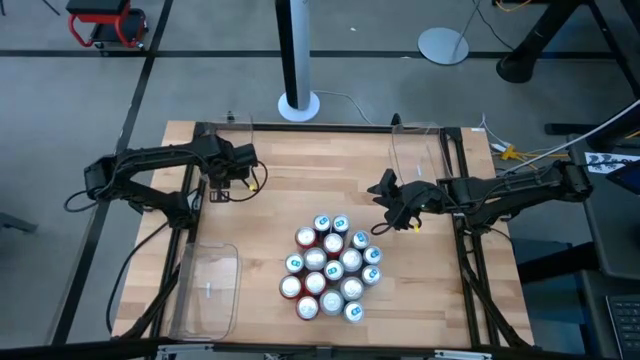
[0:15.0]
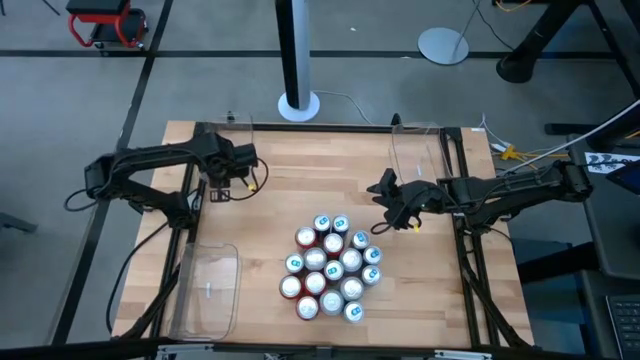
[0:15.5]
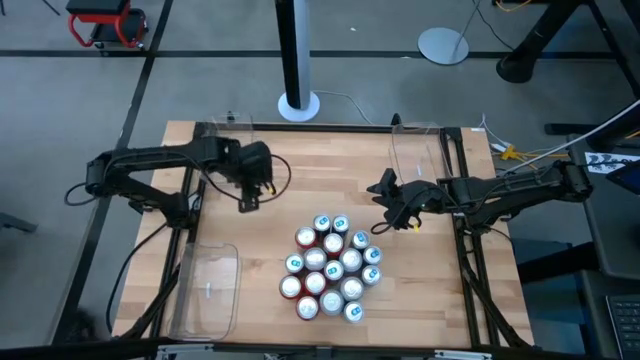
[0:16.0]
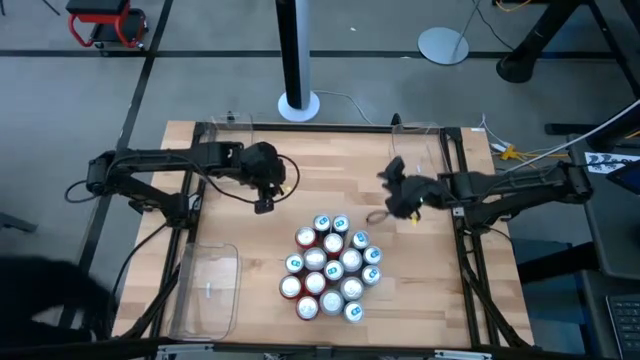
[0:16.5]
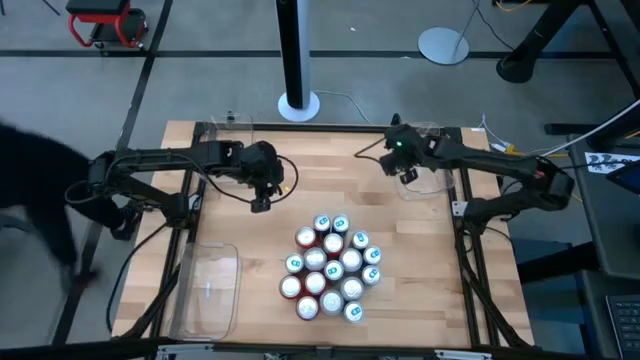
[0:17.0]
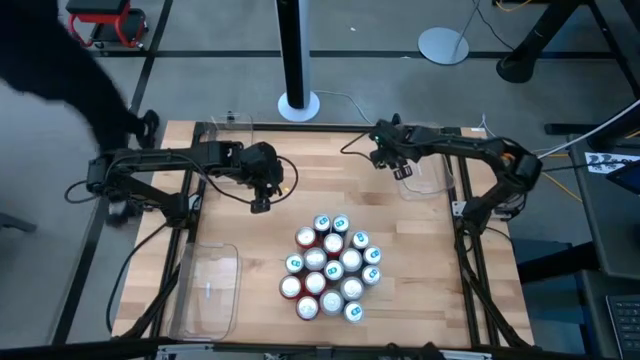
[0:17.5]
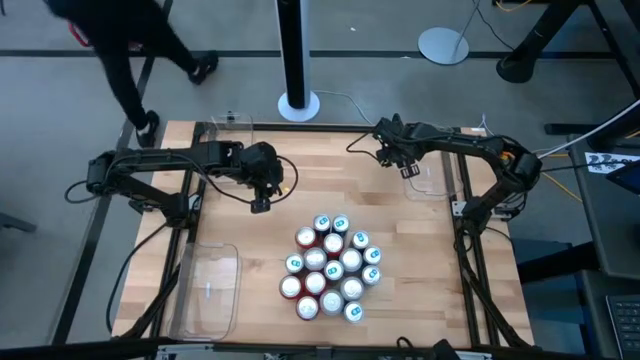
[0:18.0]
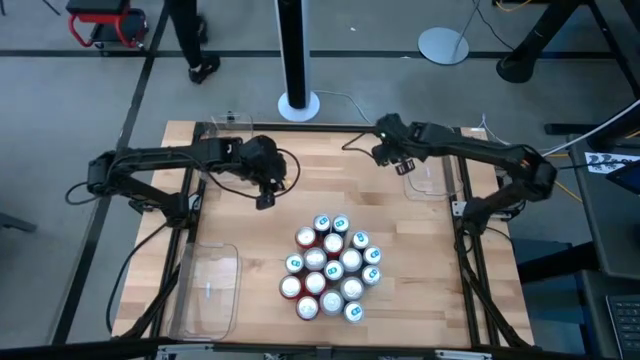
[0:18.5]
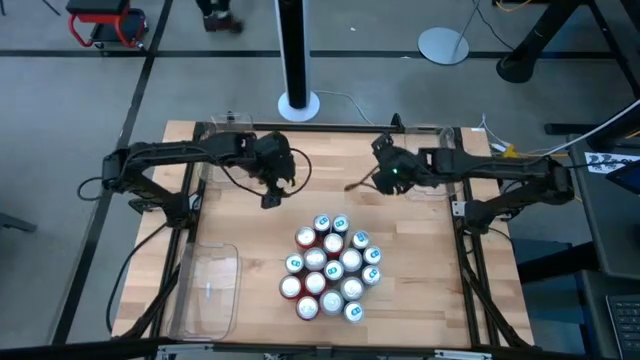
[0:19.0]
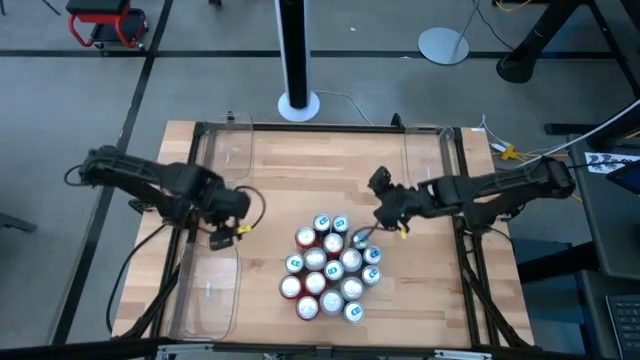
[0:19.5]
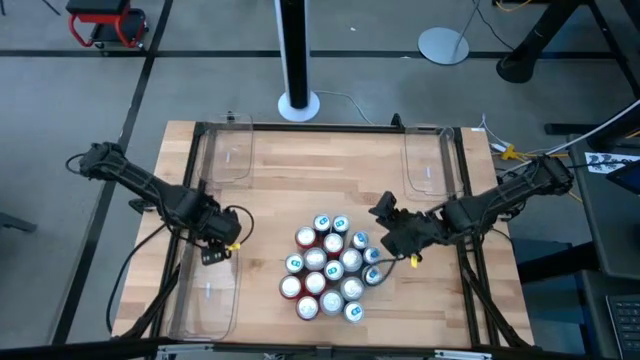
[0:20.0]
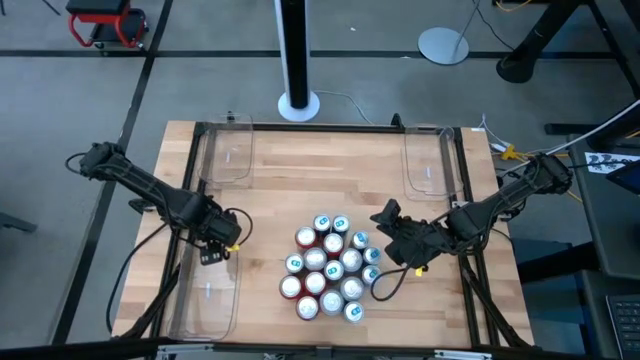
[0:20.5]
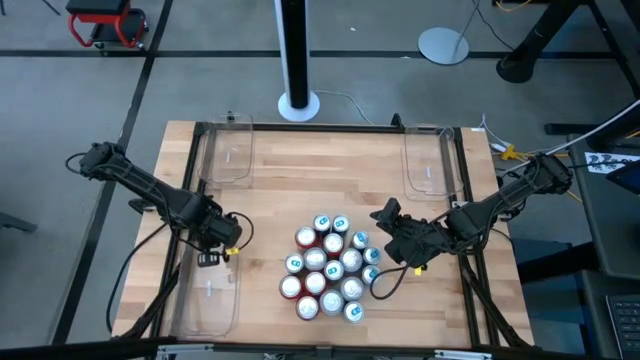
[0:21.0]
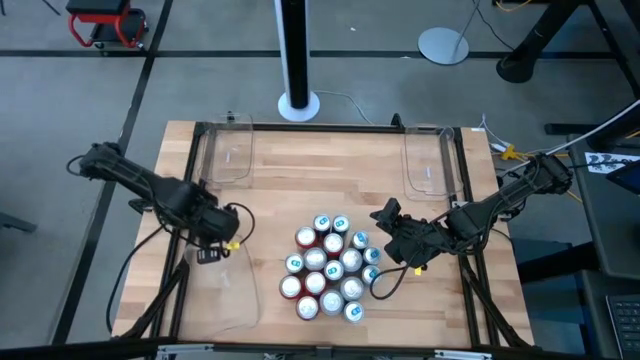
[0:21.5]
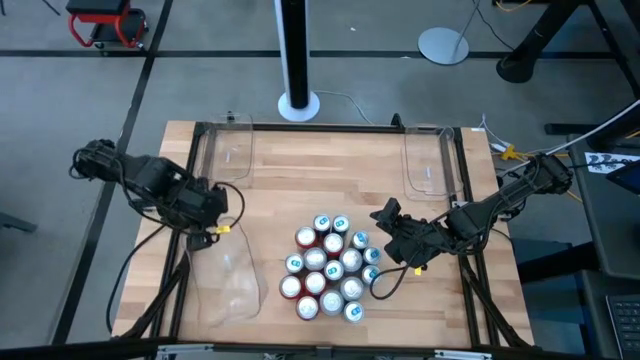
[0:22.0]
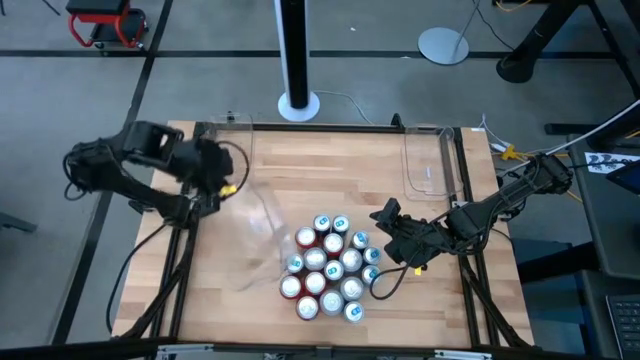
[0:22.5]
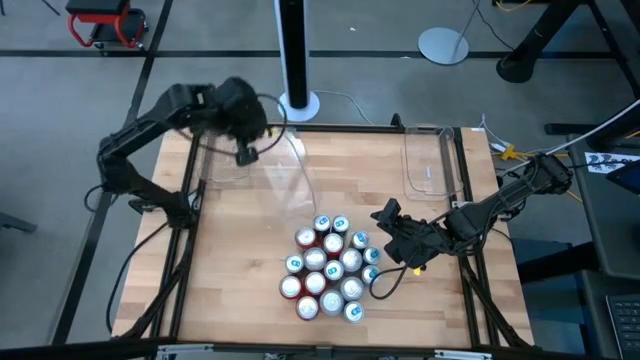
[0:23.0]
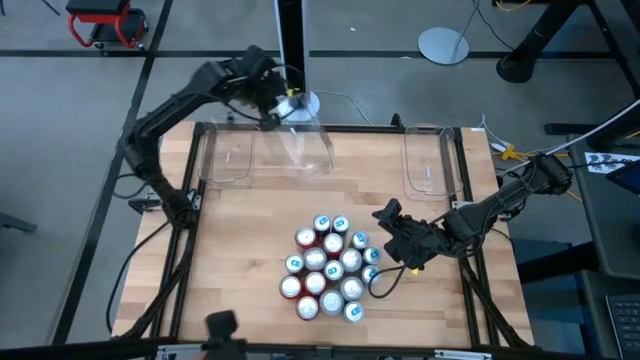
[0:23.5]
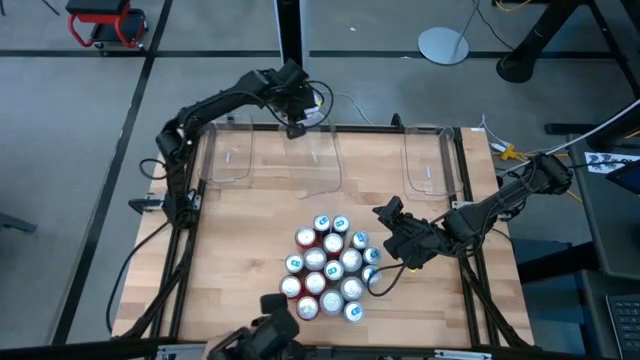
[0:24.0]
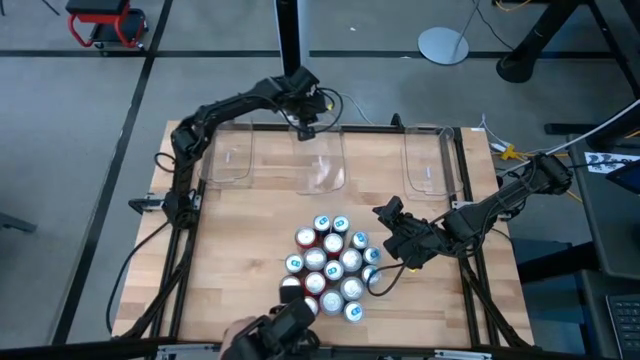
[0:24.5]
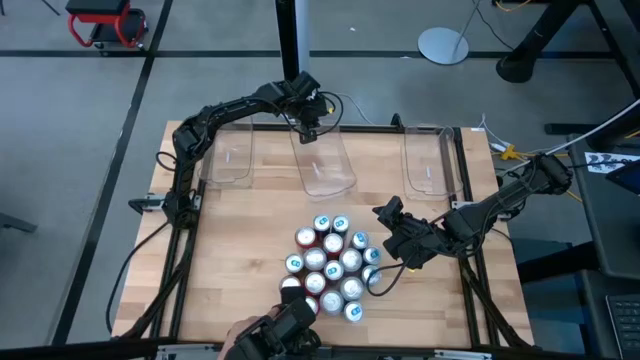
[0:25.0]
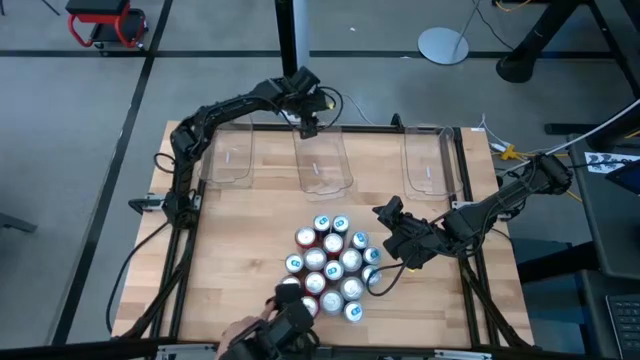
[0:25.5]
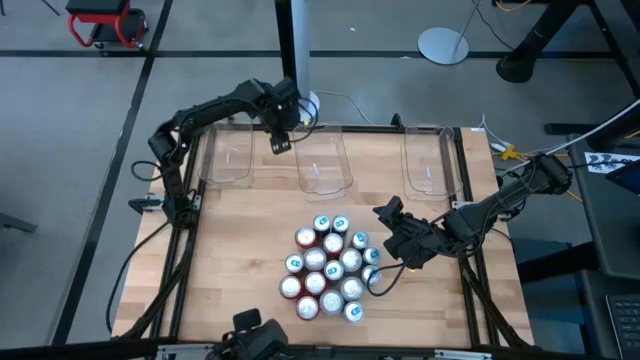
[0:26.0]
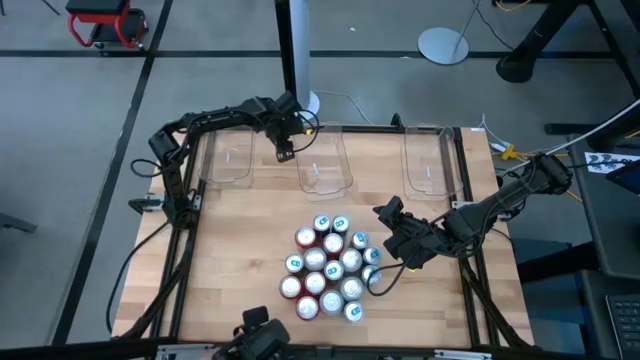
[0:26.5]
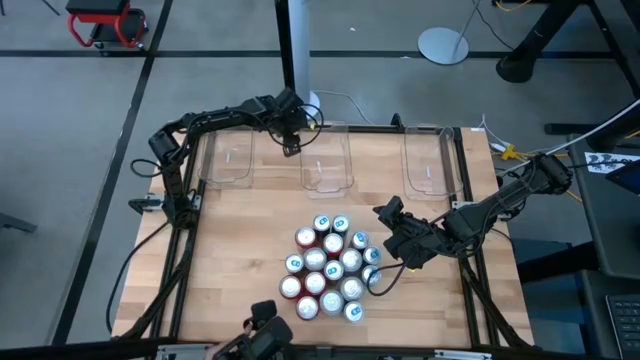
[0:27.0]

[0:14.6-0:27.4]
Task: Sort soda cans
Move the transparent bins into the top middle

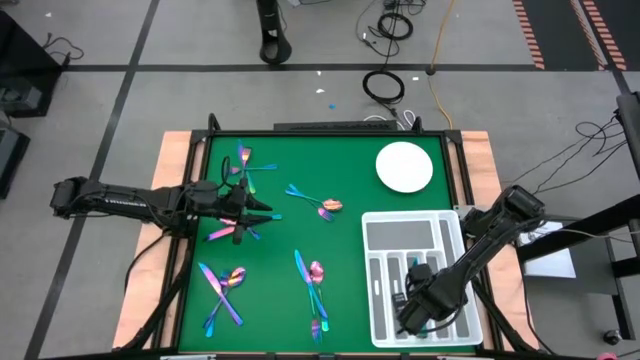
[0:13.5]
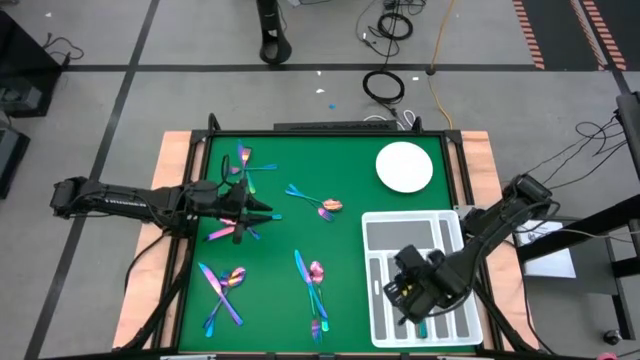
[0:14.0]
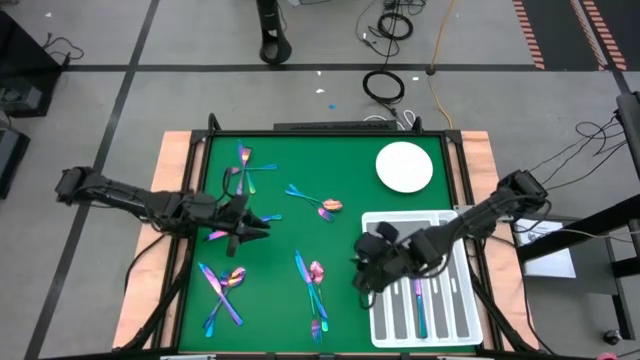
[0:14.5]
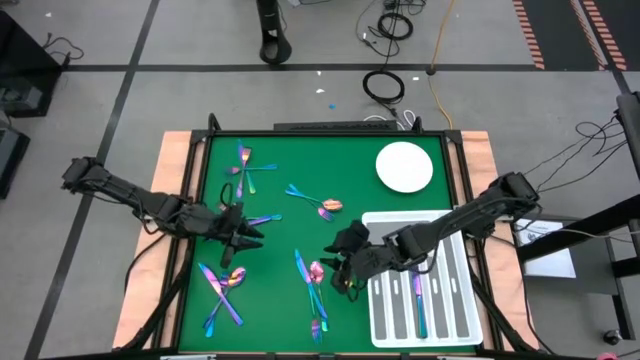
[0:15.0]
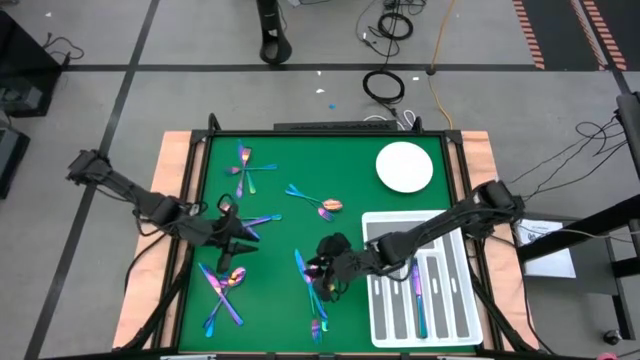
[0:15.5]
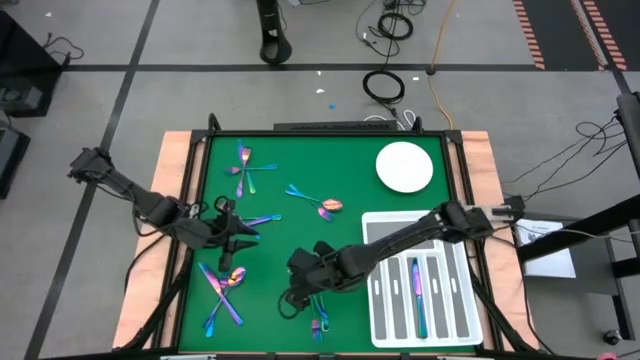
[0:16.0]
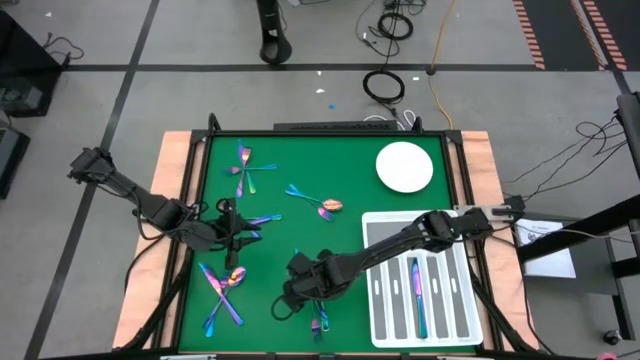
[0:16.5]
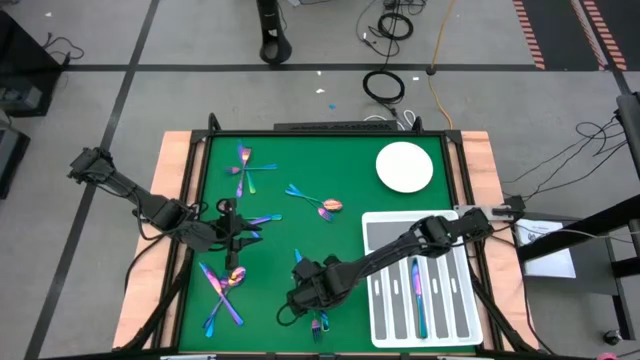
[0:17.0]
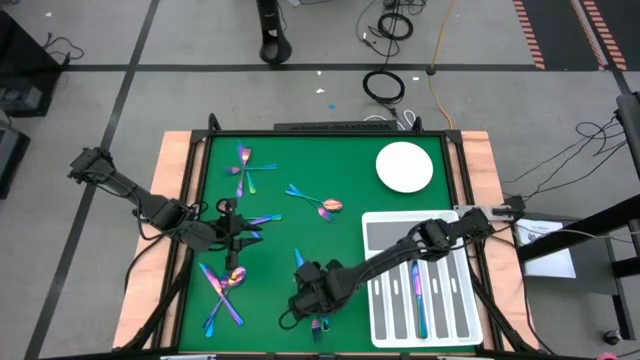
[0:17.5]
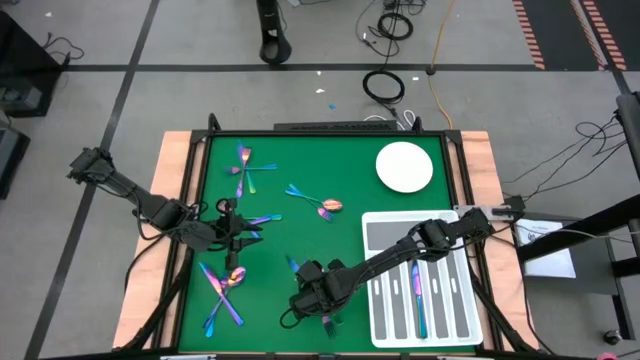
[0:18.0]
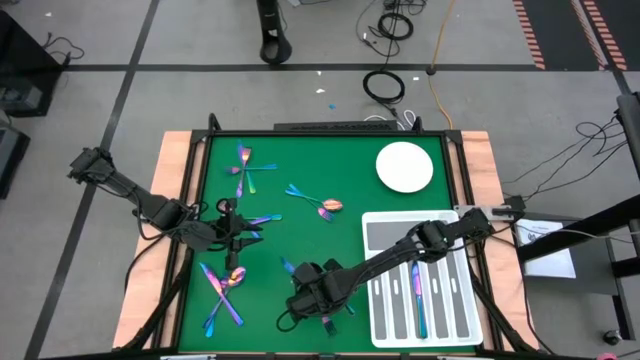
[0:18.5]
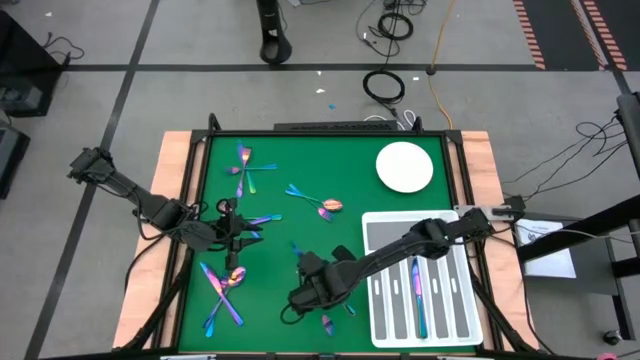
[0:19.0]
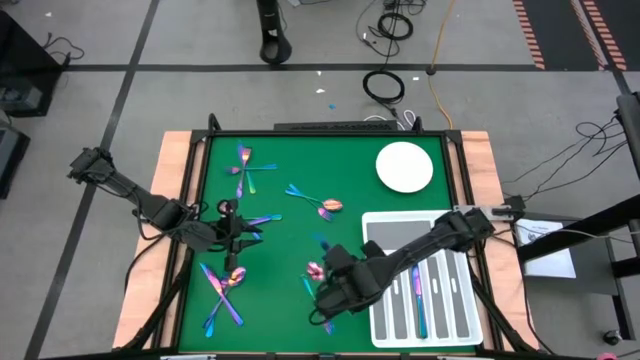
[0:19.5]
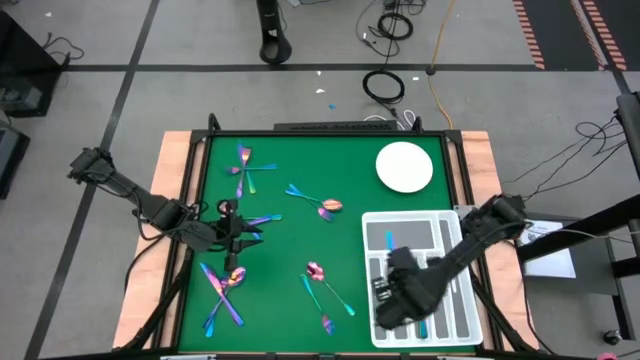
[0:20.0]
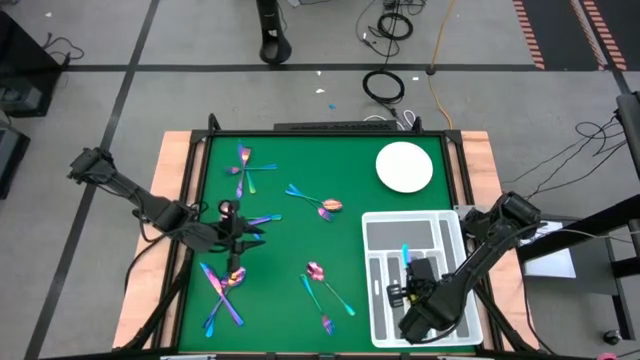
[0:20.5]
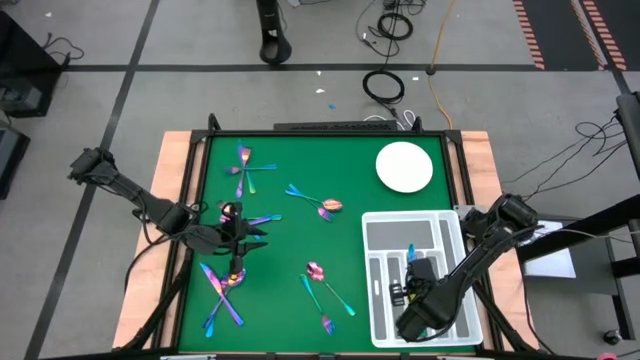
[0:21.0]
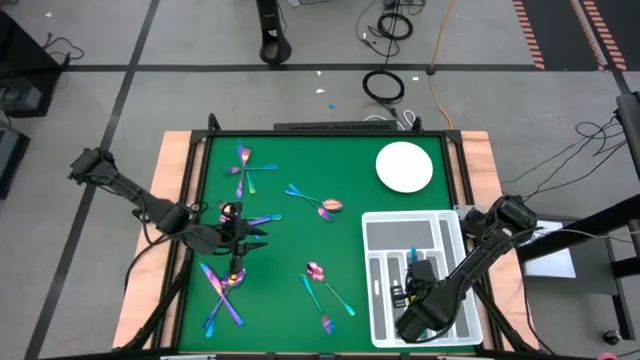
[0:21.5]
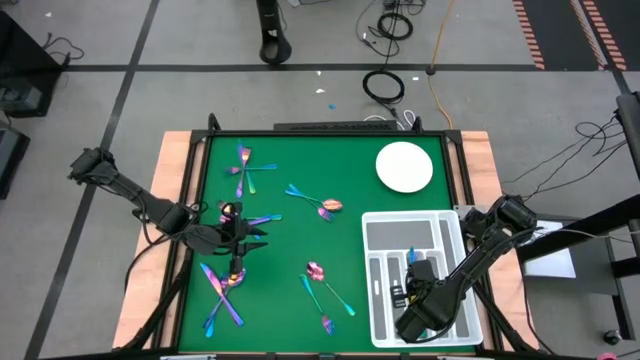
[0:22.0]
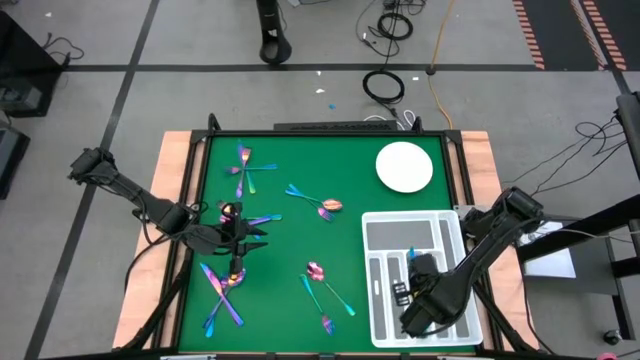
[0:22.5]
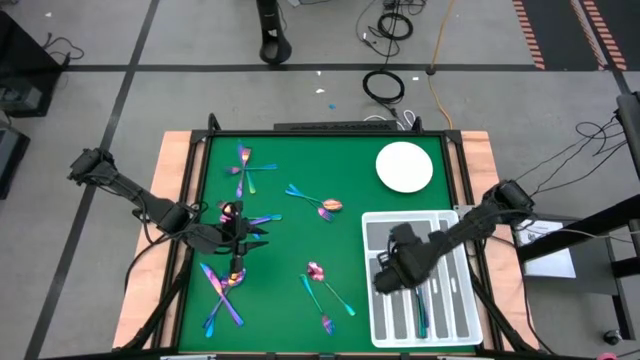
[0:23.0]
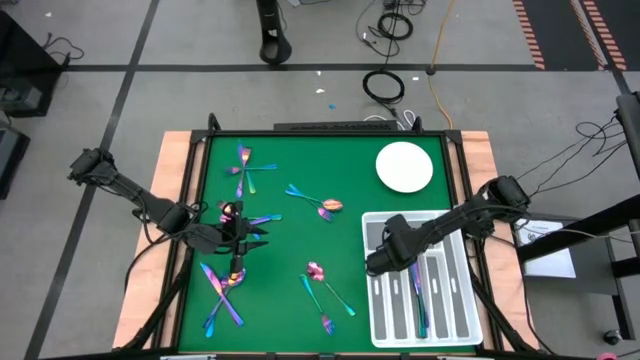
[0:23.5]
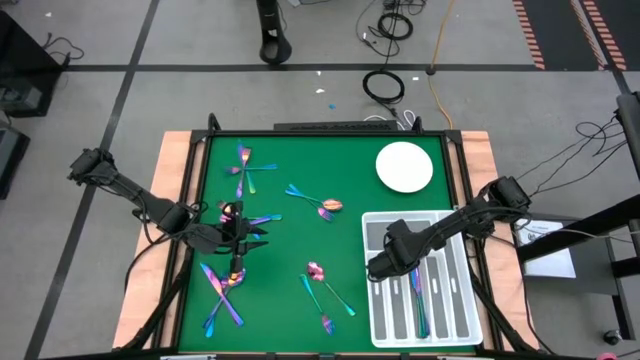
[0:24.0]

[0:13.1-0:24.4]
Task: Sort silverware
Put the bottom right knife into the utensil organizer
